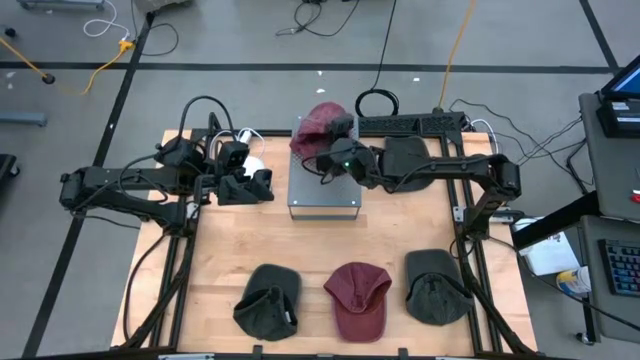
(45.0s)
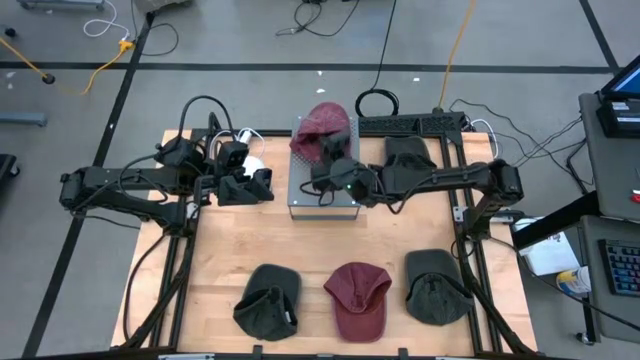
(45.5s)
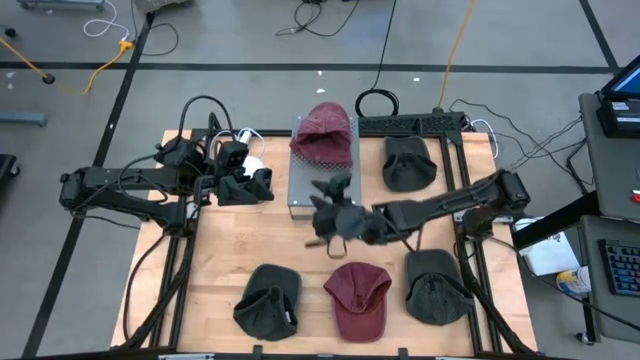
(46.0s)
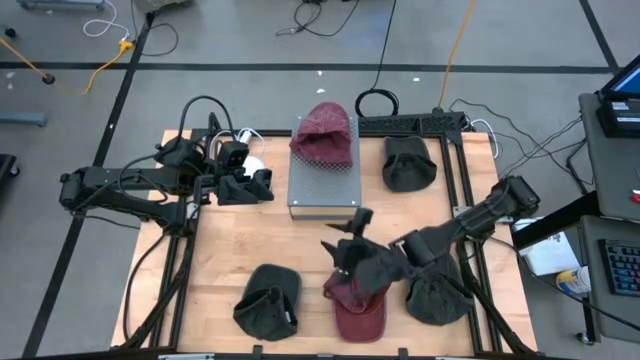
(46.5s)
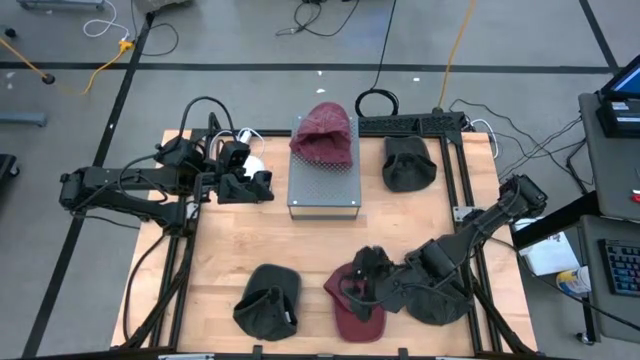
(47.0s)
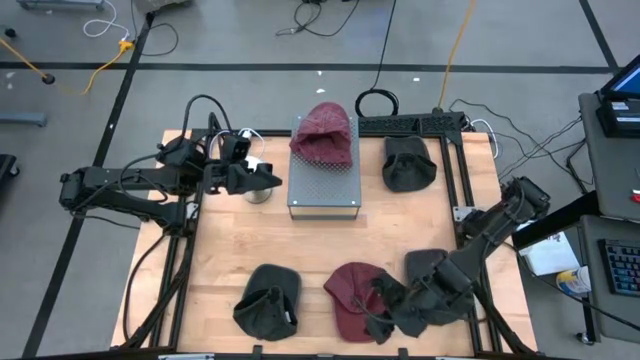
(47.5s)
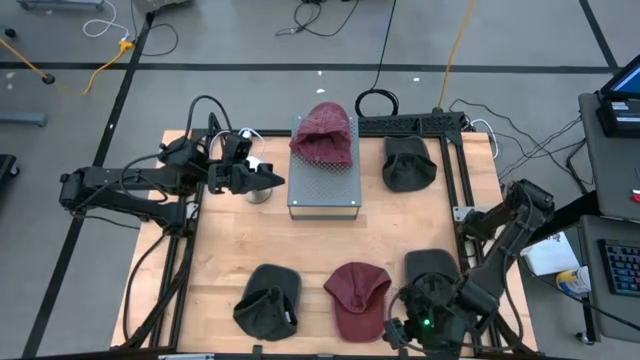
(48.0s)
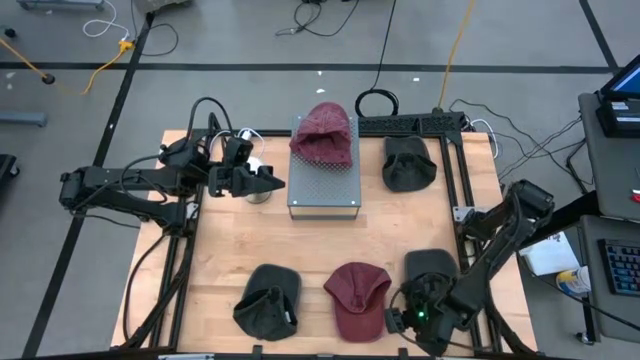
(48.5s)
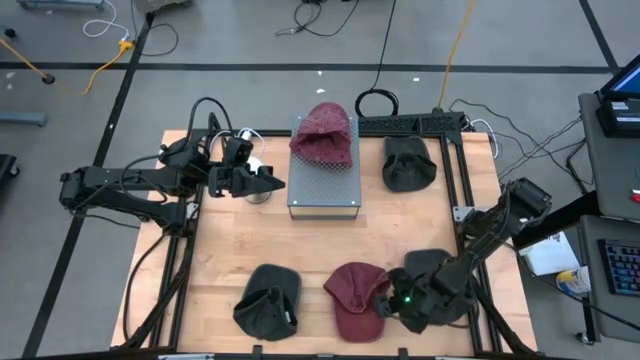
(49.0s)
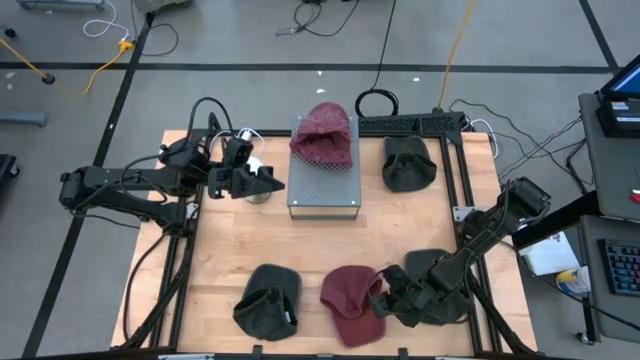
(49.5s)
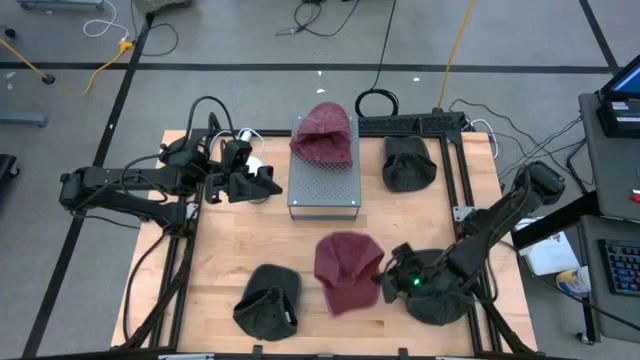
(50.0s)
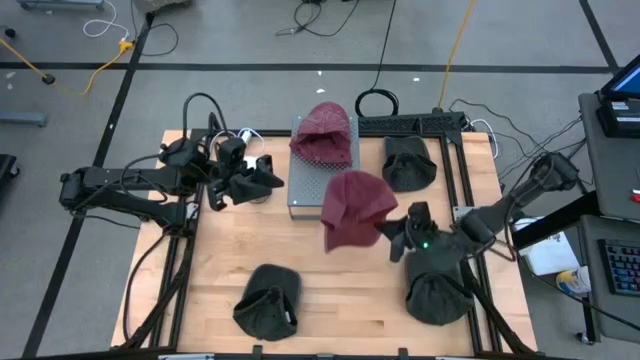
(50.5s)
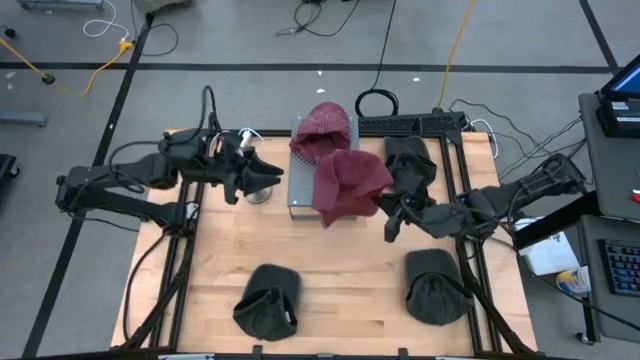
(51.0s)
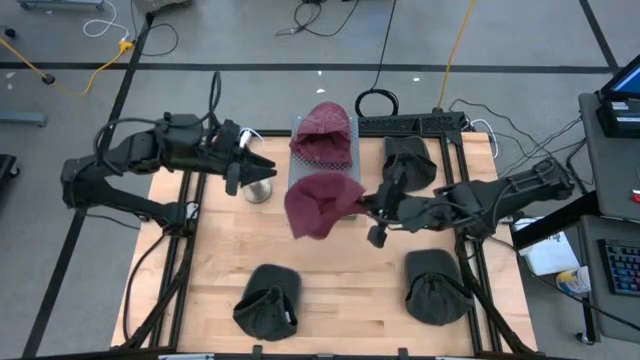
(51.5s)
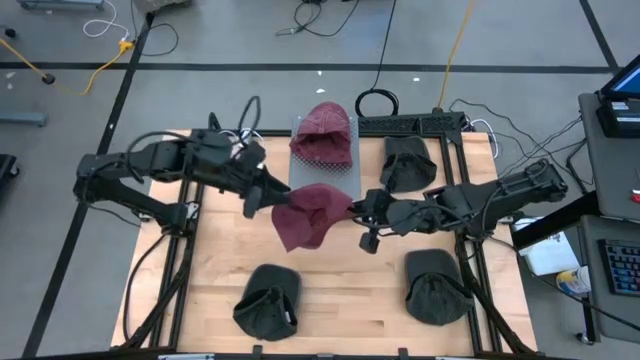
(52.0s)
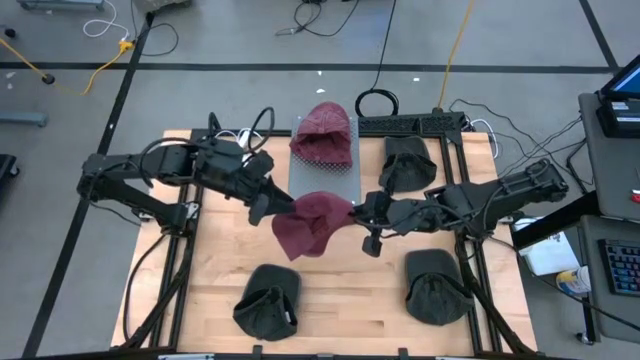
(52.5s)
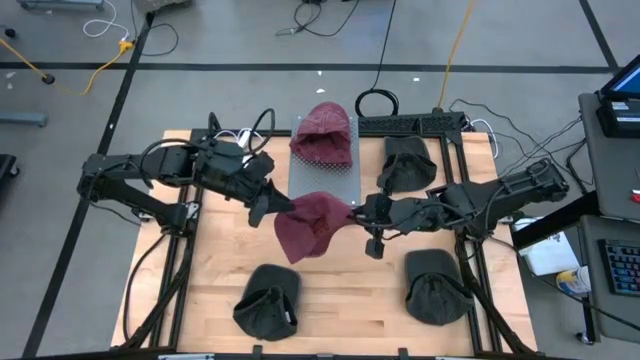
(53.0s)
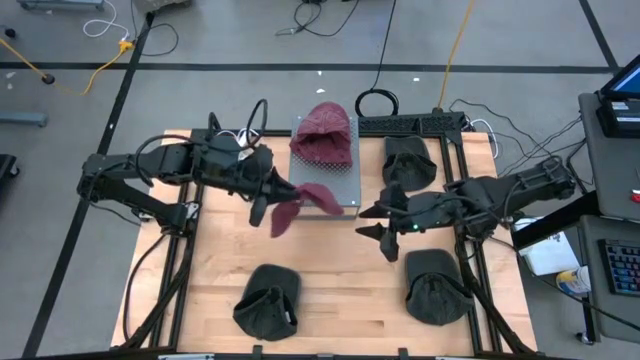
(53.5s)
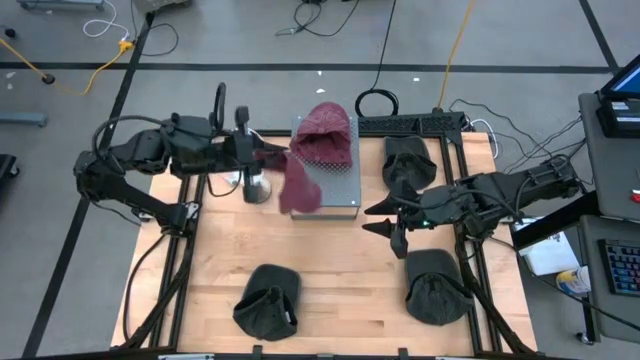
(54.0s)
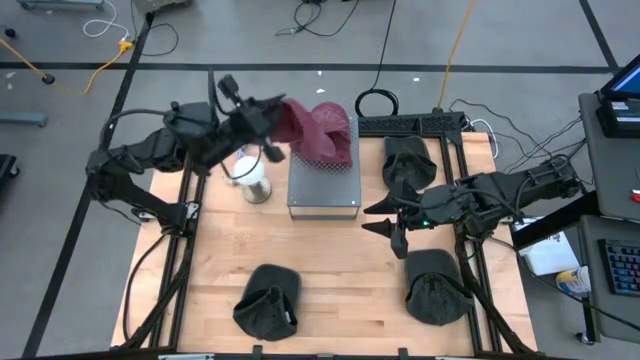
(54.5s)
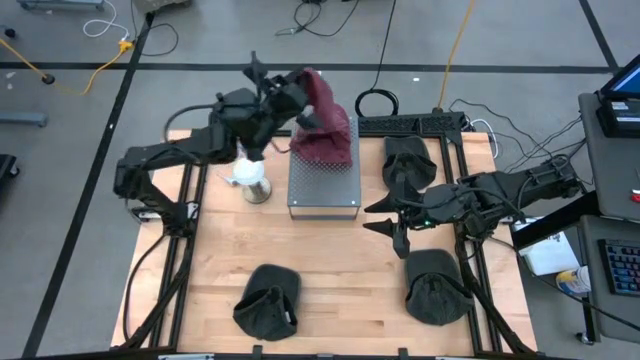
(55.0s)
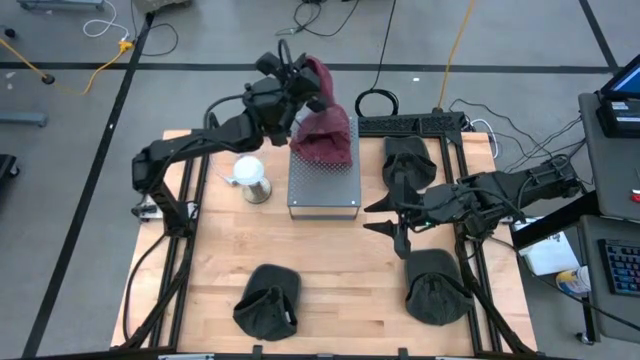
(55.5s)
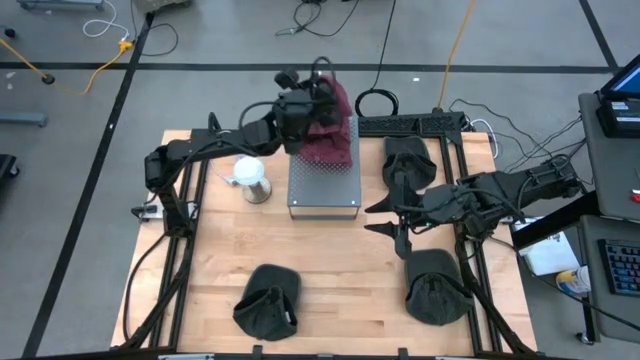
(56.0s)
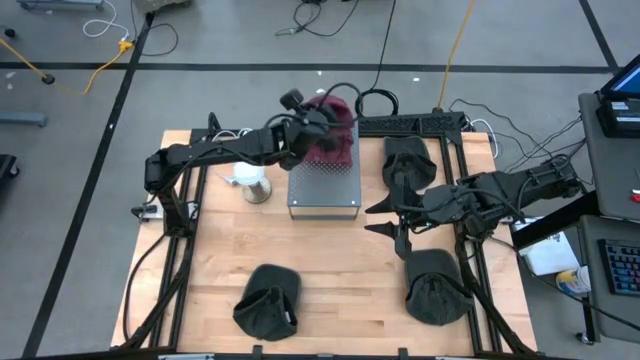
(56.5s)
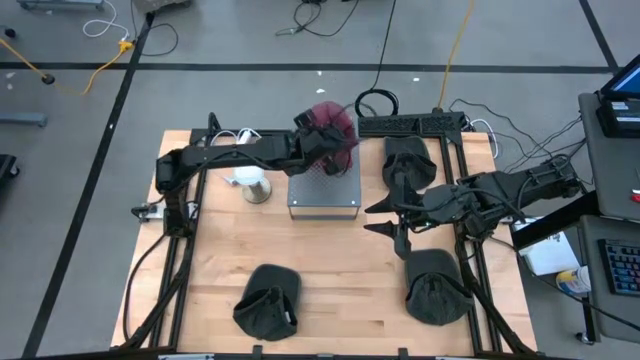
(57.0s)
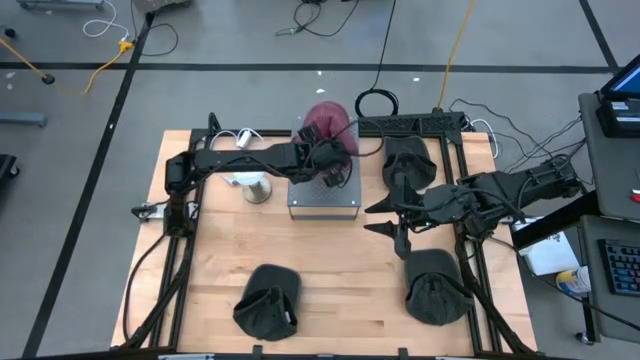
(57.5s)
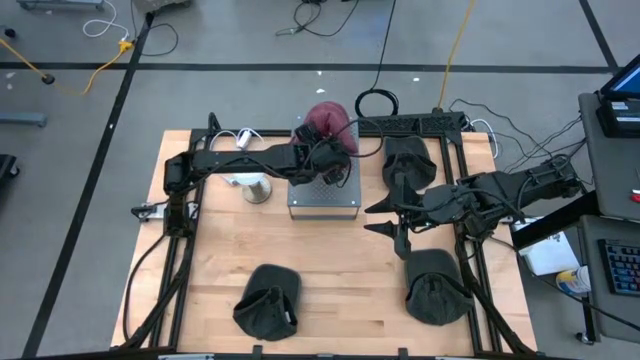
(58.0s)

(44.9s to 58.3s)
Task: Pick & Place hat
Stack the red cap on top of the red cap on the shelf

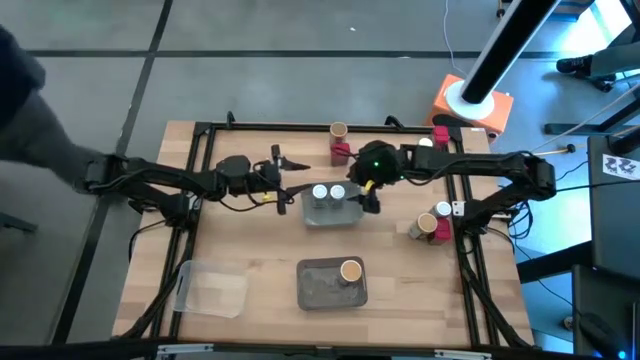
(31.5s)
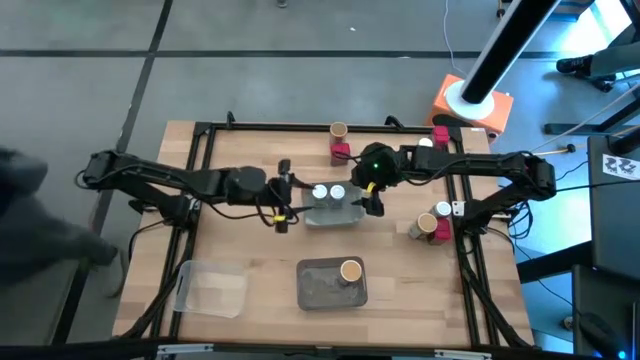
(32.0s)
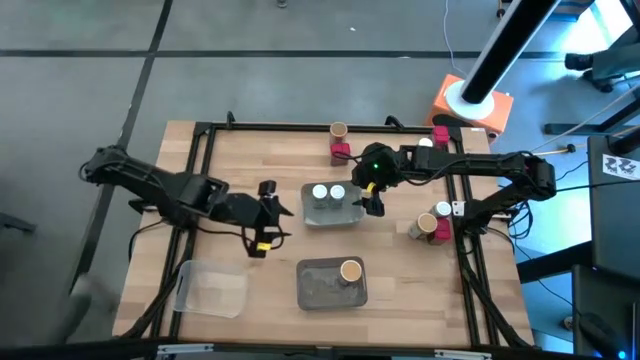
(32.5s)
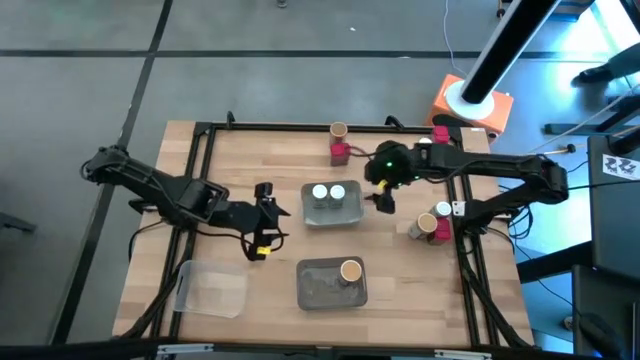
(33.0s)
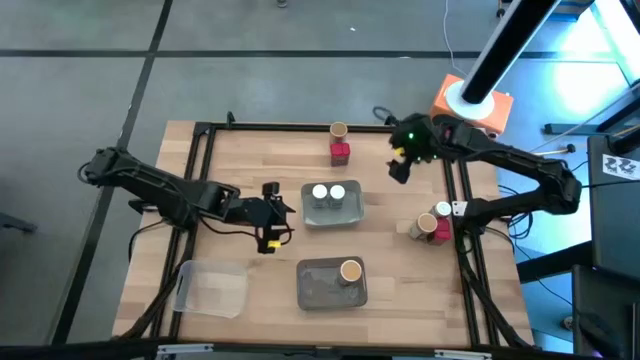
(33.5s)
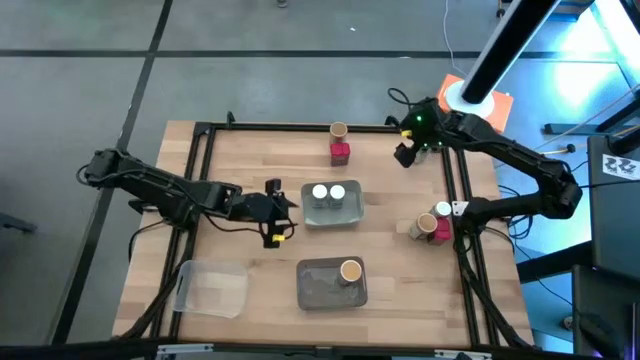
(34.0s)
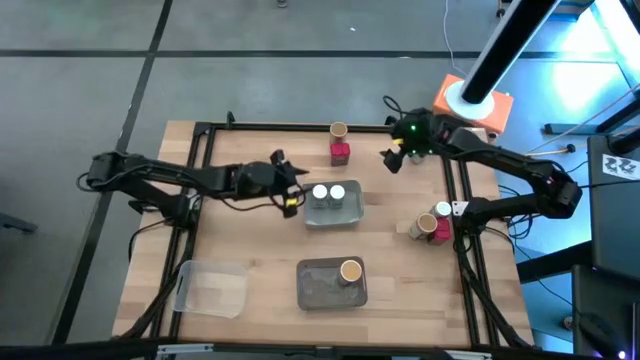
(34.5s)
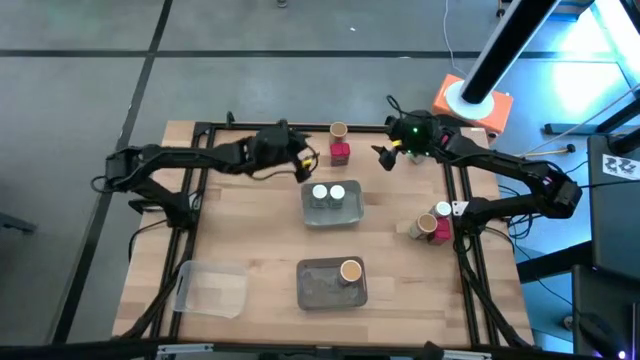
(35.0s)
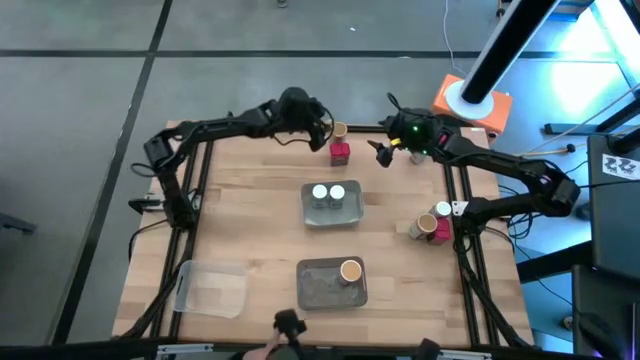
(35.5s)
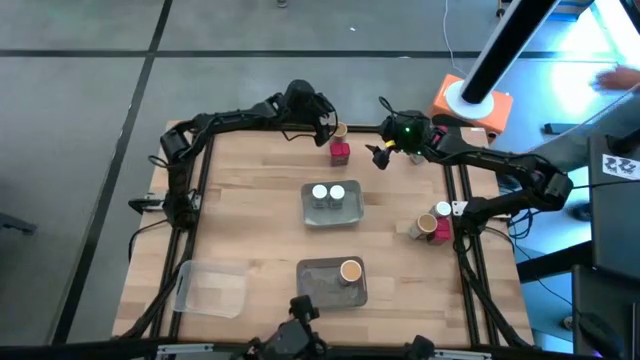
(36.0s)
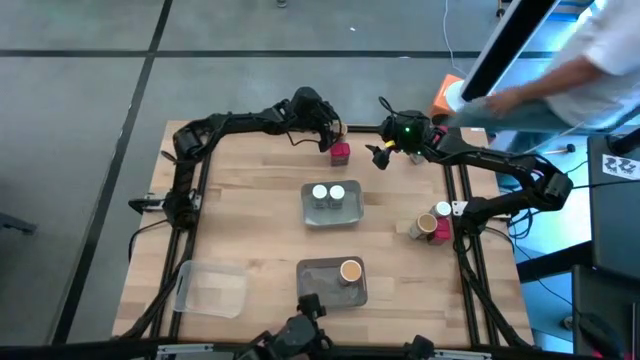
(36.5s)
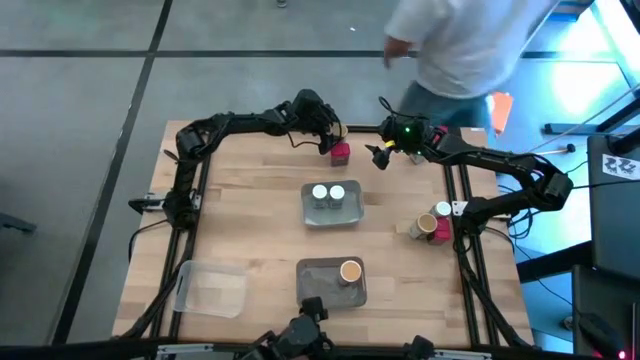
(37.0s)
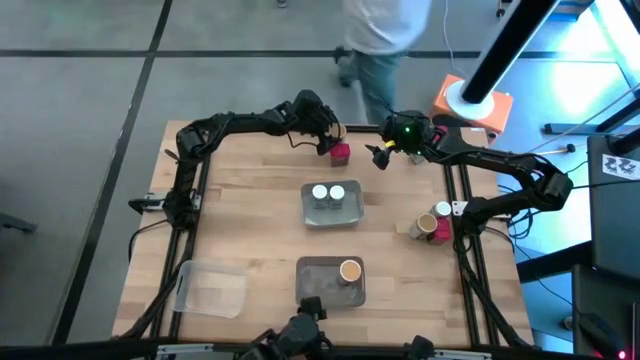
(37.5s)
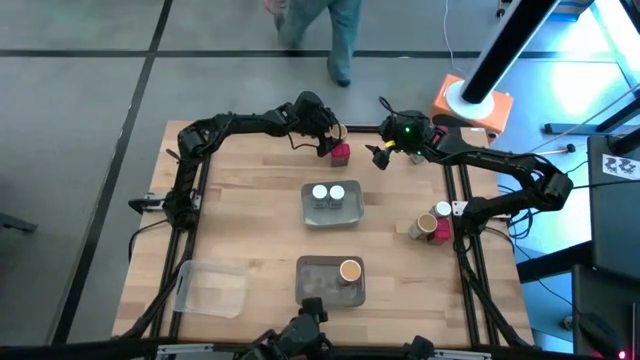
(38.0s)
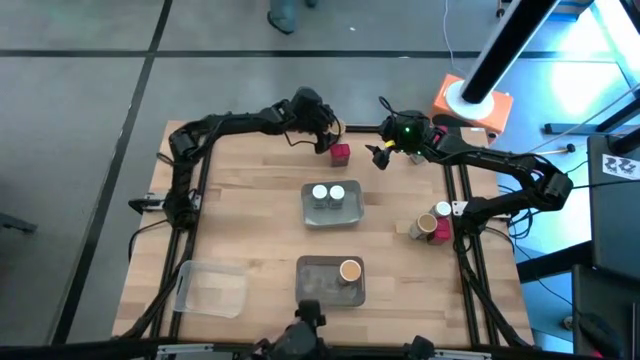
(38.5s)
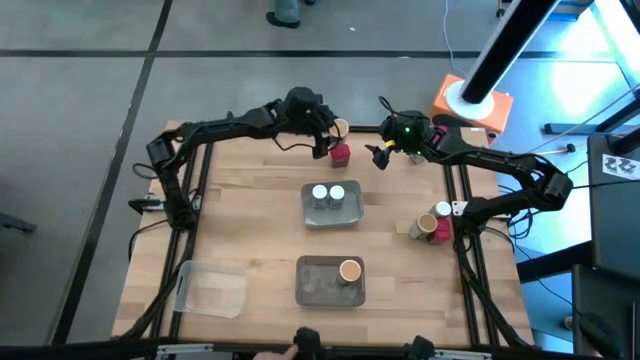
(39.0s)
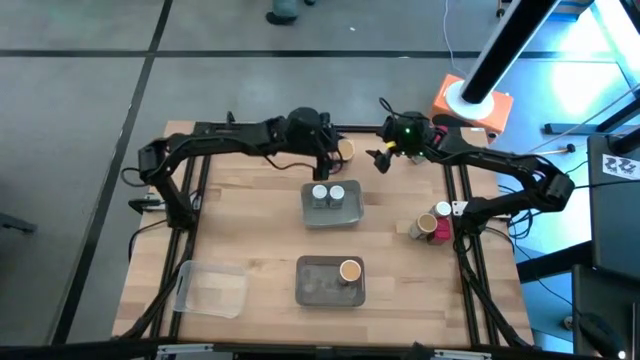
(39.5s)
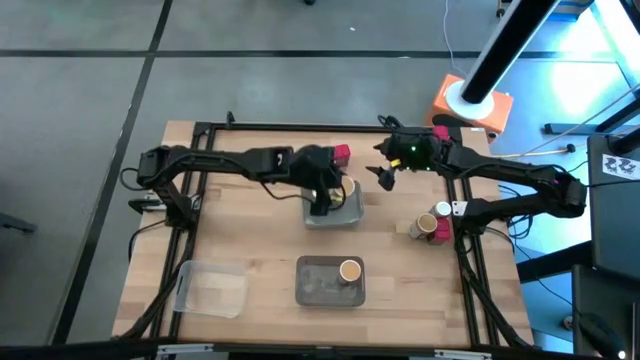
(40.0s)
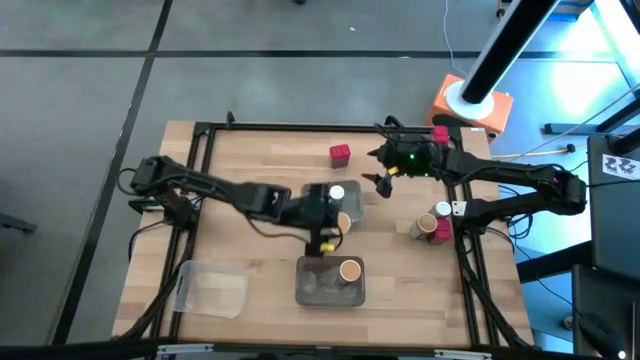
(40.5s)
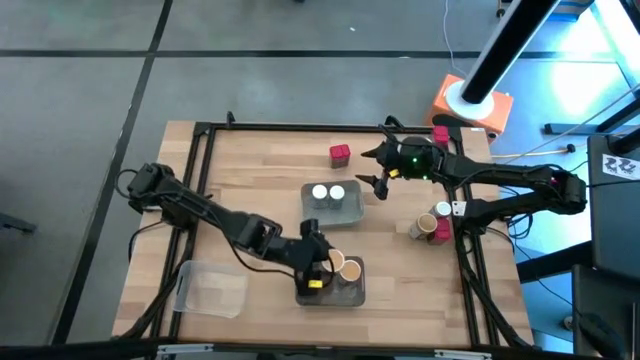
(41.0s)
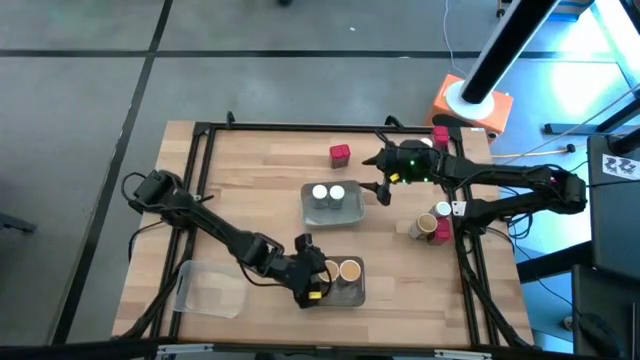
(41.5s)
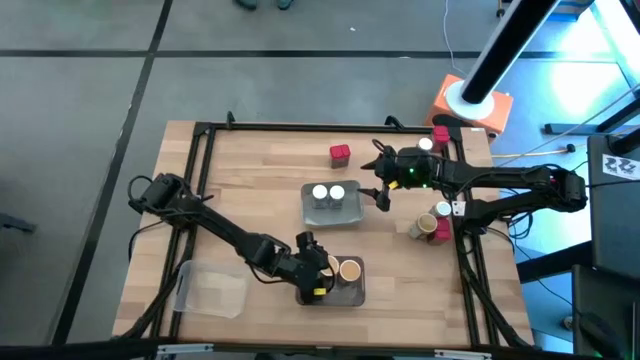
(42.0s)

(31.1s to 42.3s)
Task: Sort spices by type
Put the top golden seasoning bottle into the black bin
